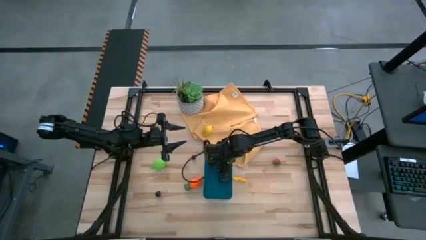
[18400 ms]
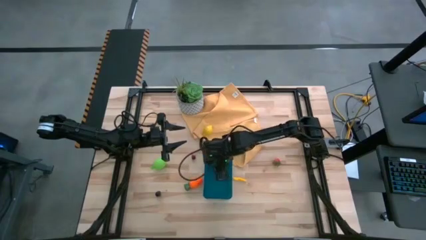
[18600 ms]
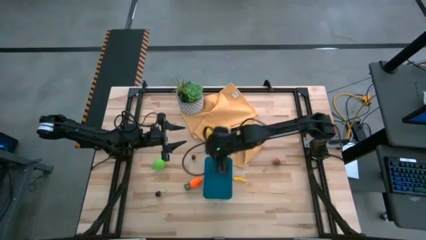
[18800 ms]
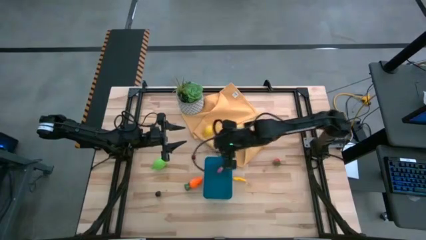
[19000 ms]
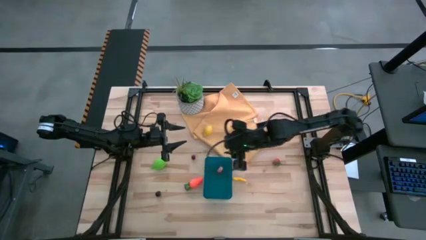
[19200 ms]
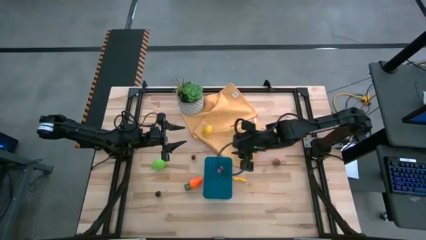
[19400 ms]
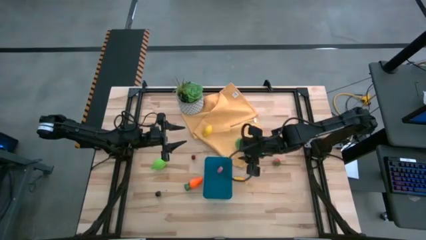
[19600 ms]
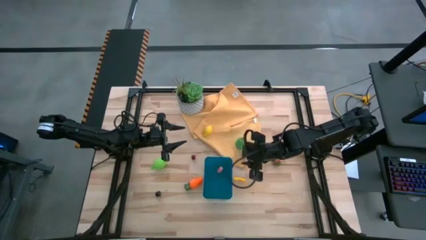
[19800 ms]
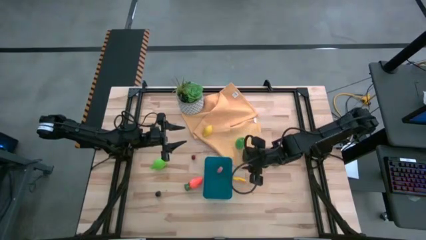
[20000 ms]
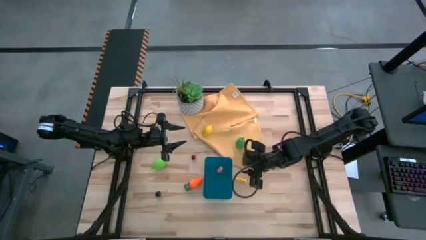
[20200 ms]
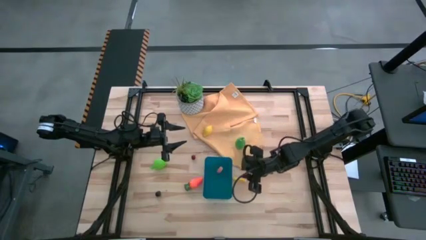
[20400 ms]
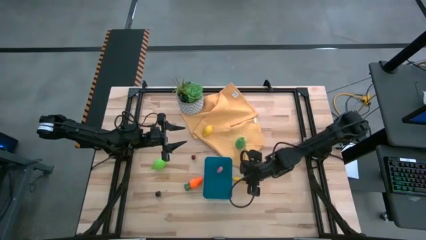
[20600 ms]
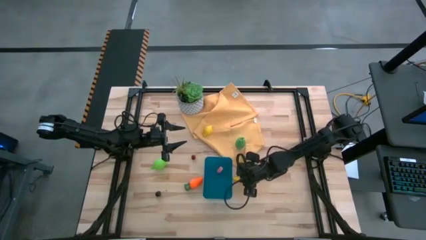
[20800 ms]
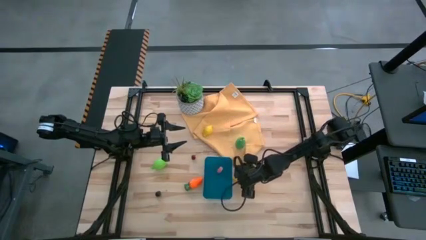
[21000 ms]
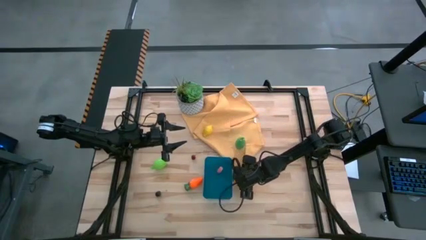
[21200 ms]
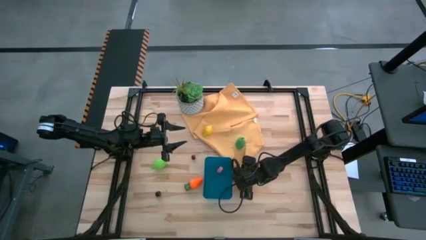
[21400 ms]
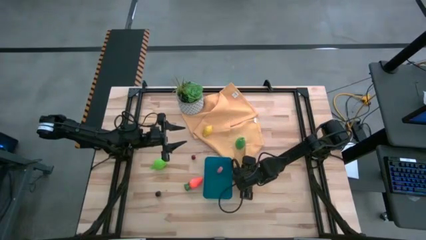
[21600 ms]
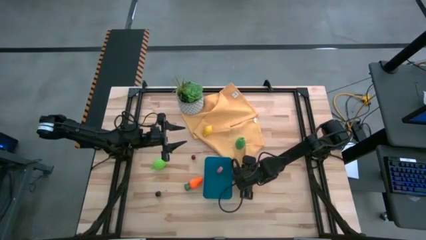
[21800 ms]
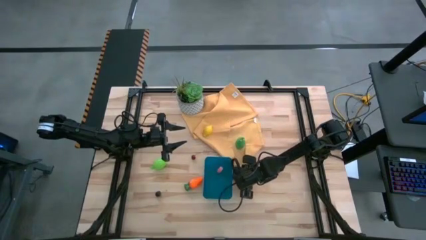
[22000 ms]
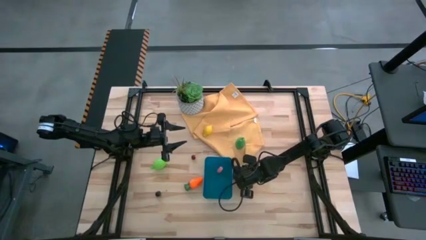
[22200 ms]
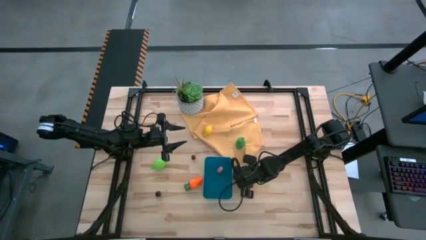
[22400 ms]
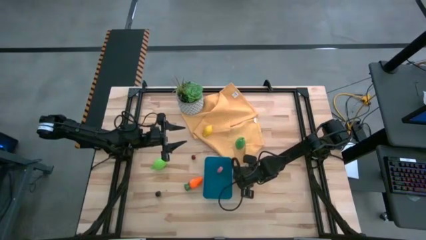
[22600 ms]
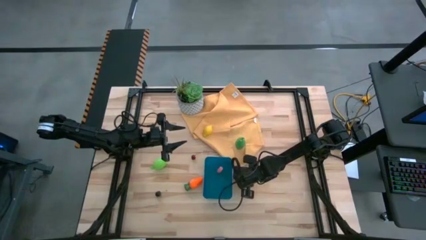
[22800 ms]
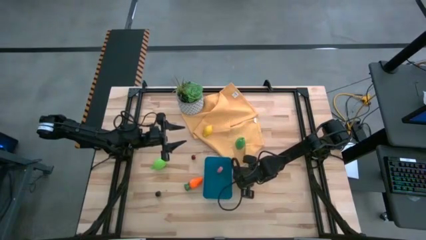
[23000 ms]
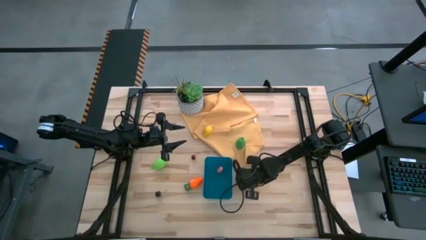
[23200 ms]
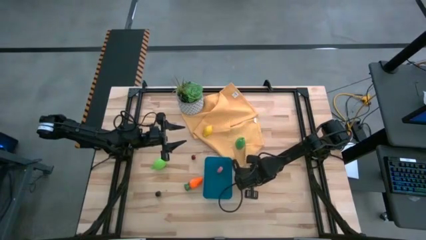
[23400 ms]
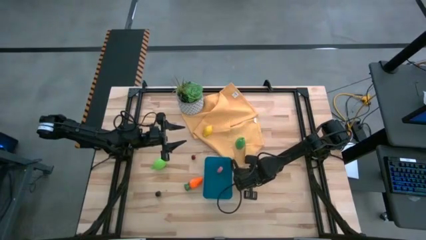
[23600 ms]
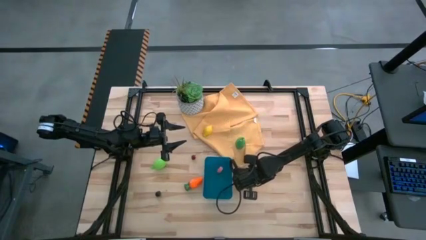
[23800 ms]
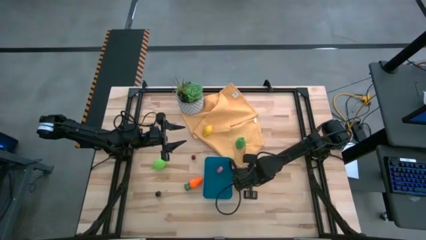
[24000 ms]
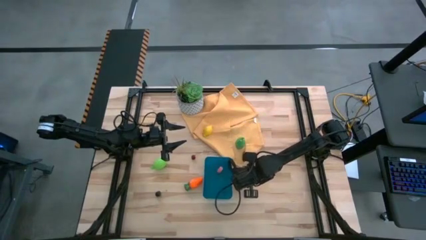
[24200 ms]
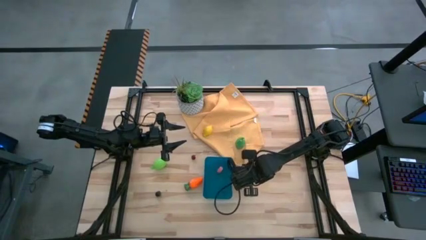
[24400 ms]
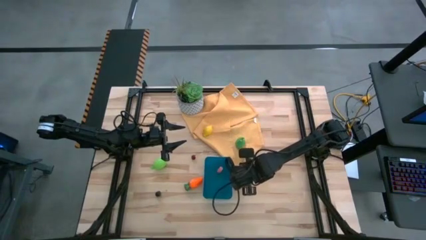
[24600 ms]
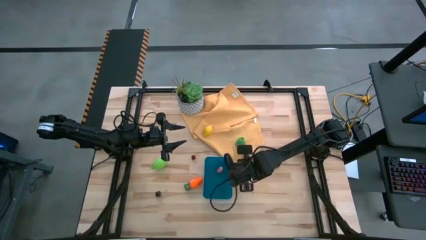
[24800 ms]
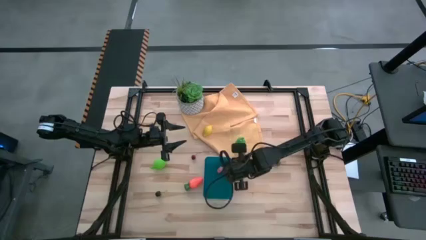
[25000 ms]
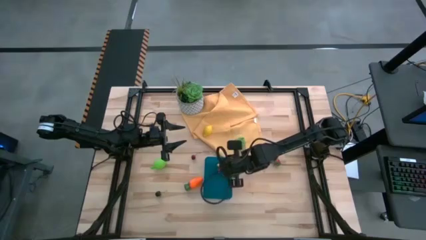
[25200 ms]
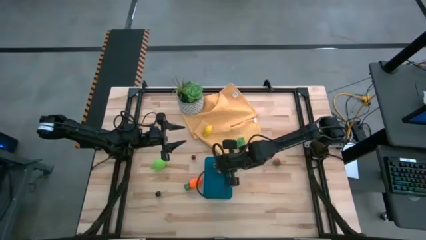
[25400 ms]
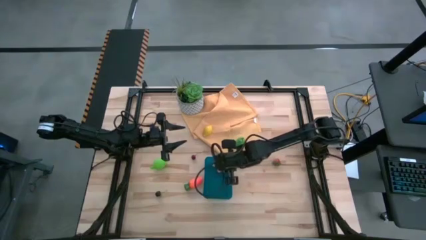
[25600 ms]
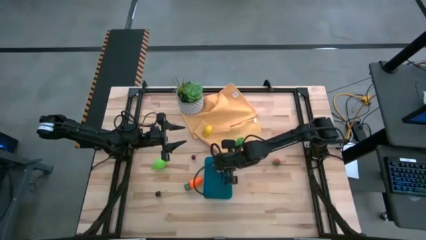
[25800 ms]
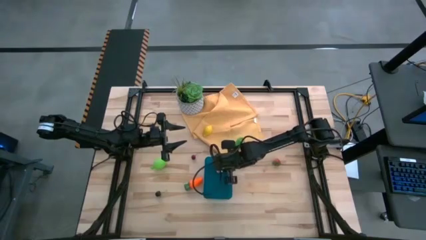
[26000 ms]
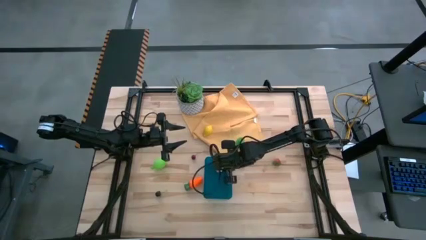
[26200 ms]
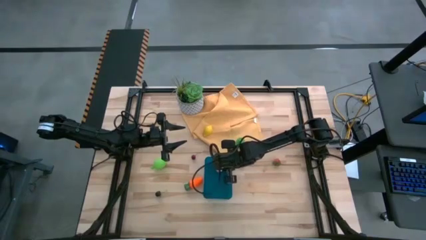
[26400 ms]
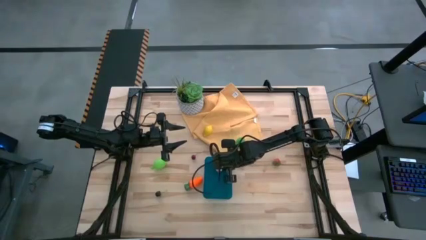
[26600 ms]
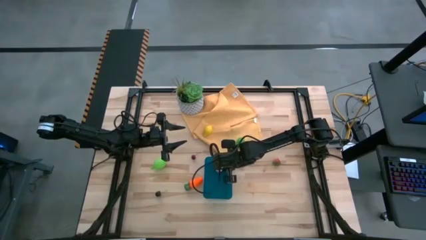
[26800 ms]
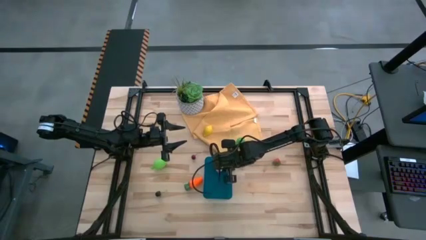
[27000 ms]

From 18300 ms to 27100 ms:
Task: Pick and placing Produce into tupperware
Put the corn into the bin

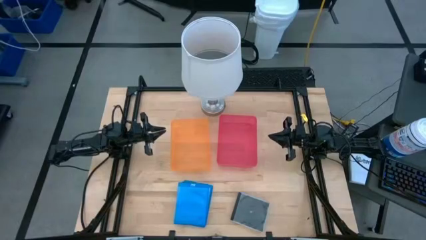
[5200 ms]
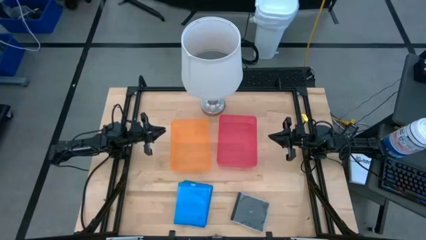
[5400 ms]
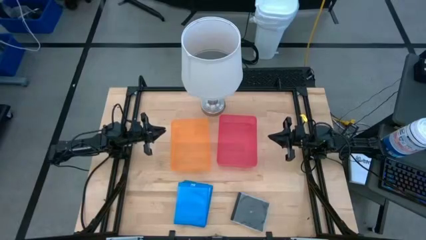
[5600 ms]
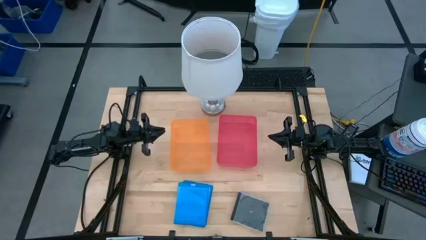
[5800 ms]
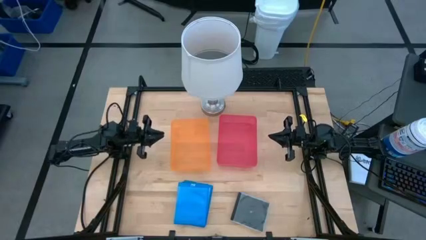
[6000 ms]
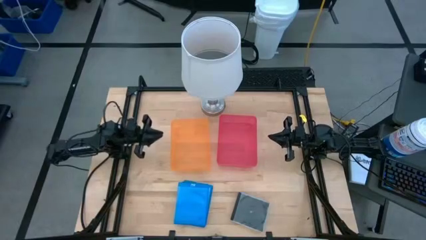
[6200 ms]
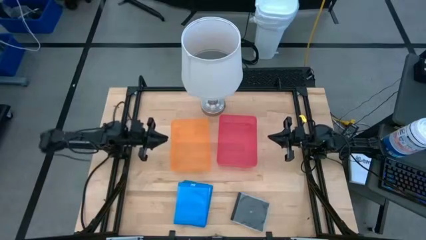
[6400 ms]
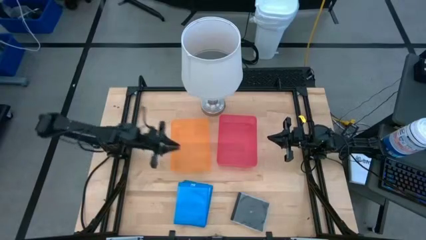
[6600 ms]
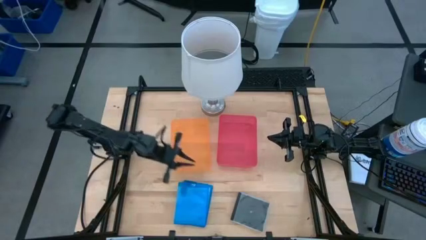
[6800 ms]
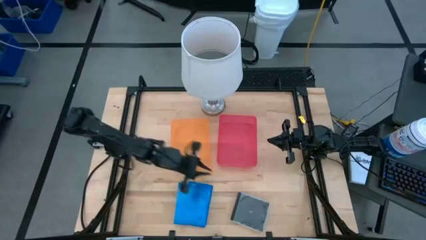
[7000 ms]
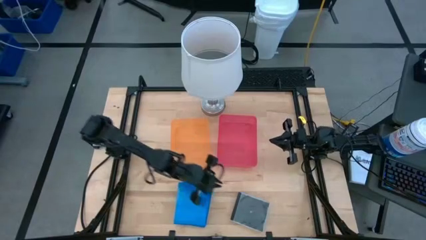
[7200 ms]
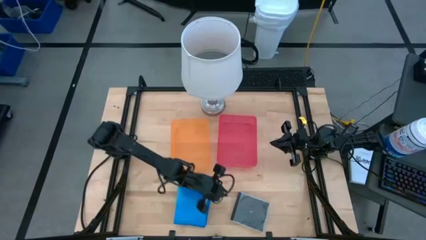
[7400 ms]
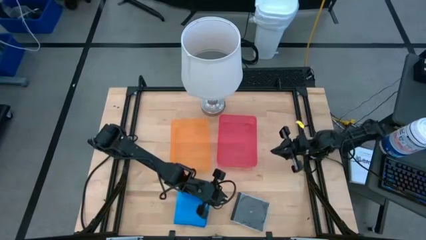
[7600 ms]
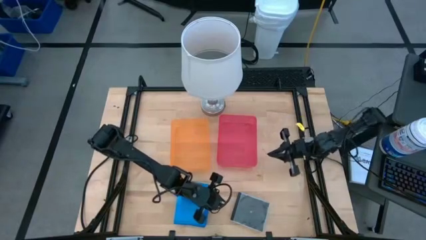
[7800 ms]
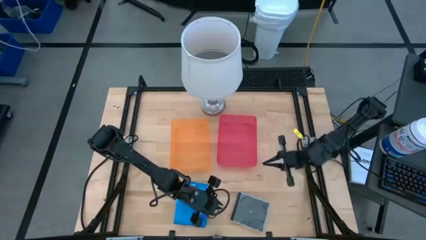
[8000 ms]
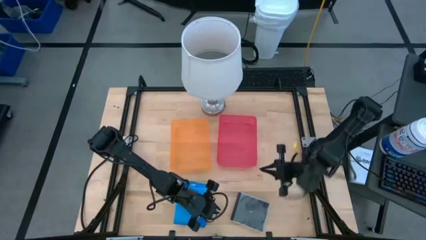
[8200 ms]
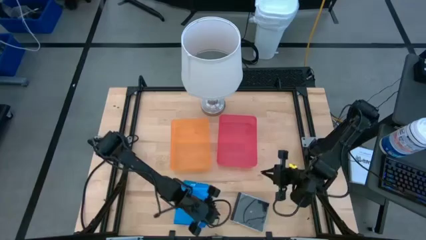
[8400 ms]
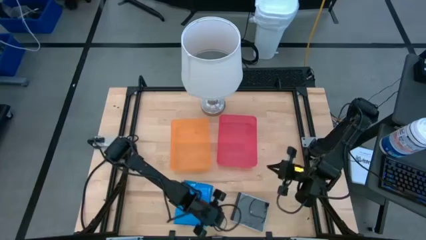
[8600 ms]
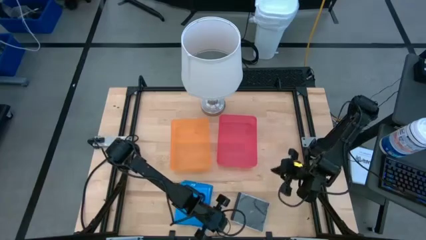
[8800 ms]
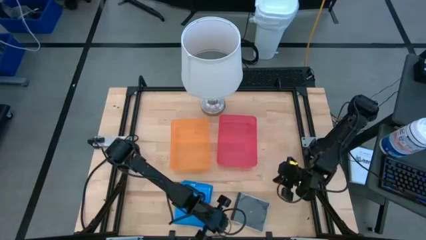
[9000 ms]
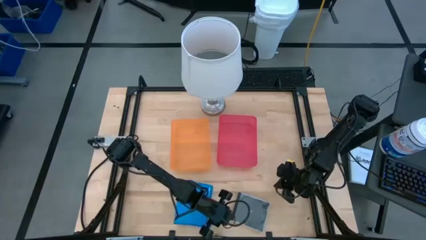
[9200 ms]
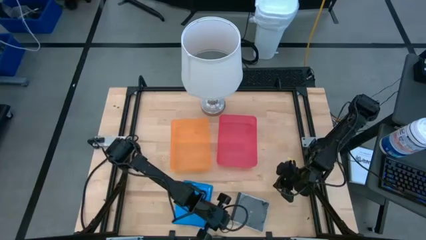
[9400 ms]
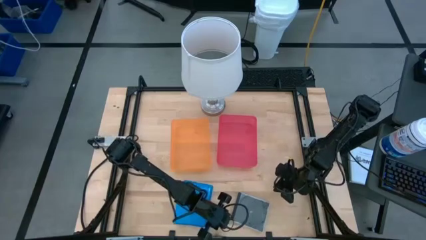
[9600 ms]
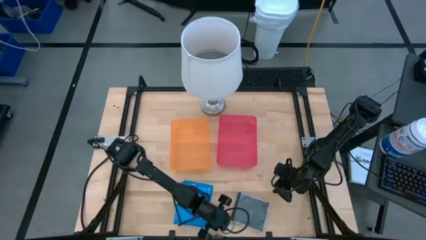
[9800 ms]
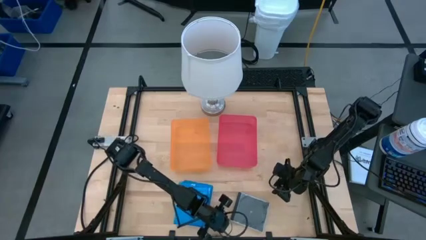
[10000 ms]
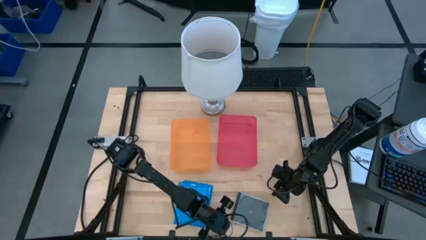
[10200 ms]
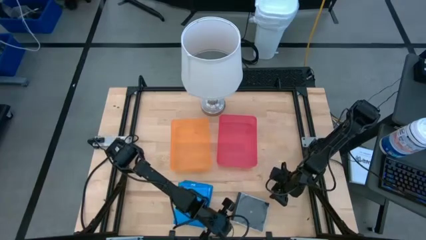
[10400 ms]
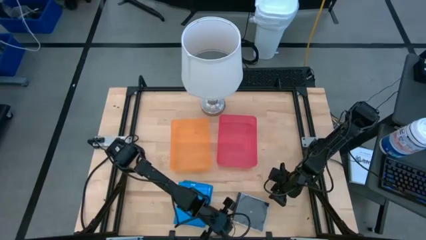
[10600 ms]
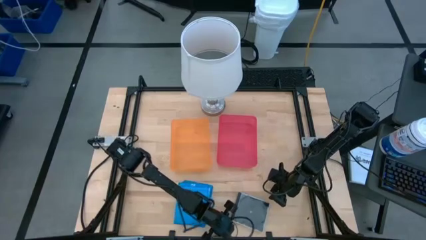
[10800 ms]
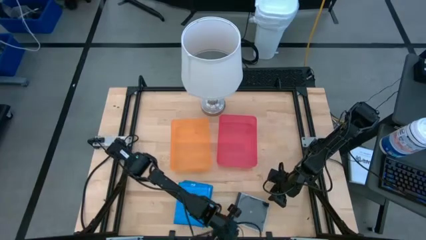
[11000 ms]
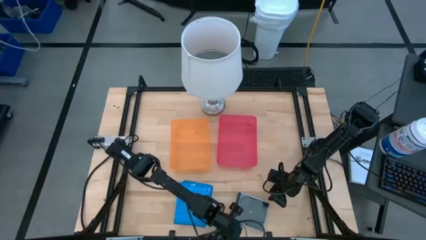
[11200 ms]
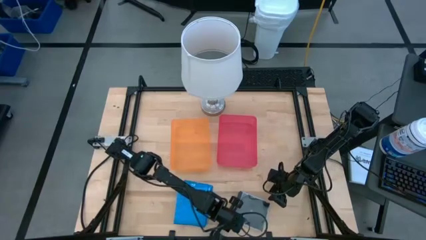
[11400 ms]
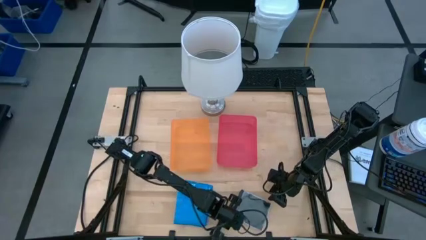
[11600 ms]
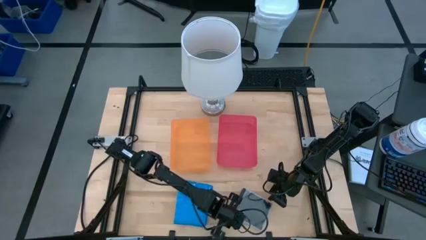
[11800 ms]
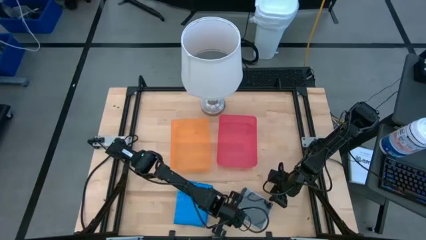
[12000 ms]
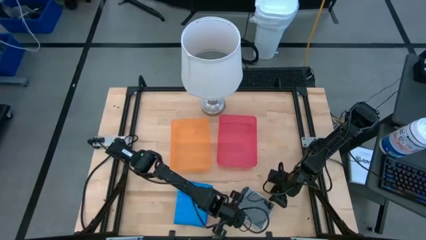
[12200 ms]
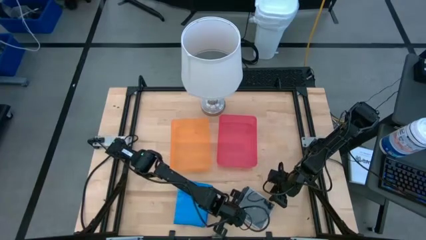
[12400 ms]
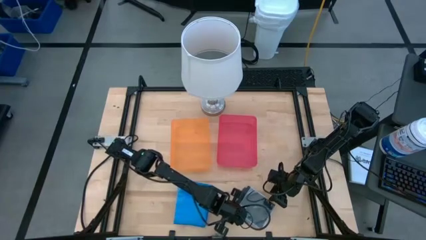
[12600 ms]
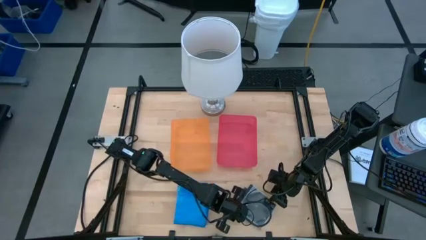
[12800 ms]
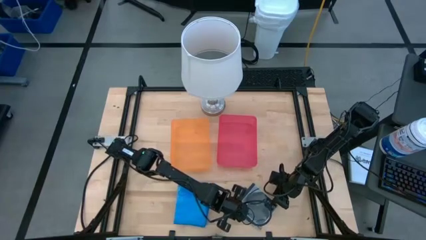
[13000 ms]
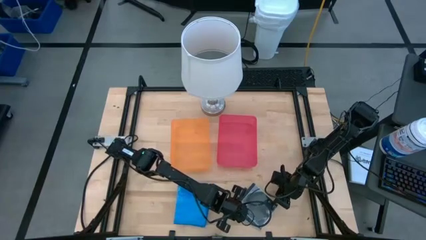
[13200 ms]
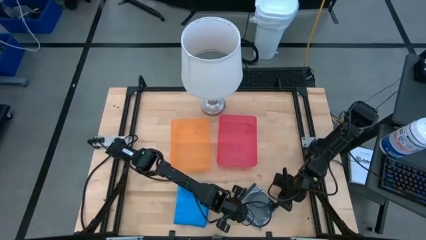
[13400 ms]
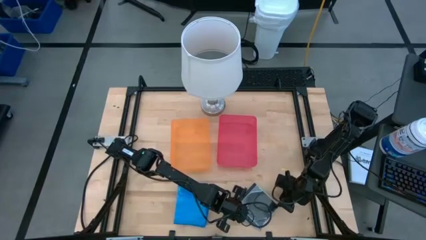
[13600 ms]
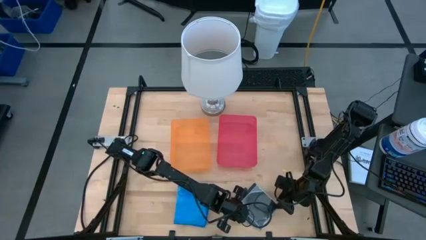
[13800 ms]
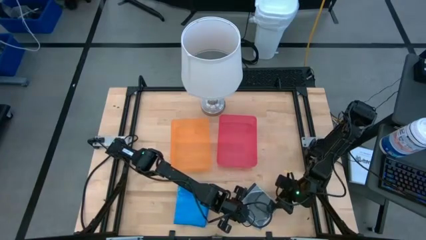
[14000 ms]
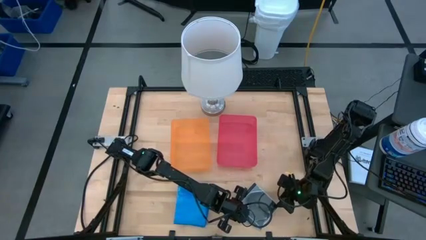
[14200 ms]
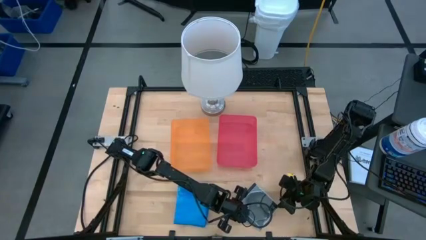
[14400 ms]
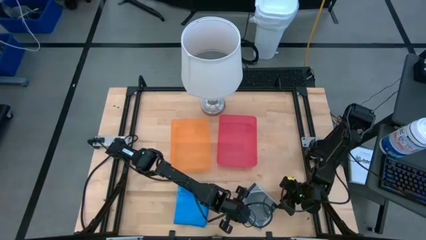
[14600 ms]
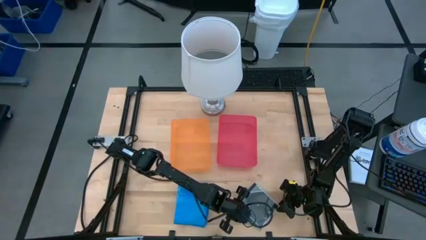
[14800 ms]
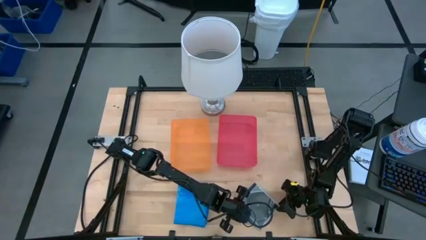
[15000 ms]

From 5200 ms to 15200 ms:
Task: Pick & place jewel cases by type
Put the black CD case into the red bin
